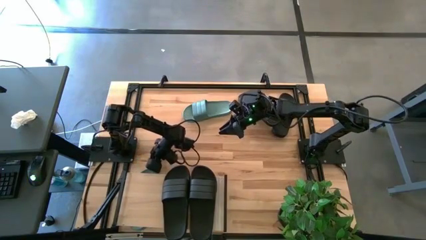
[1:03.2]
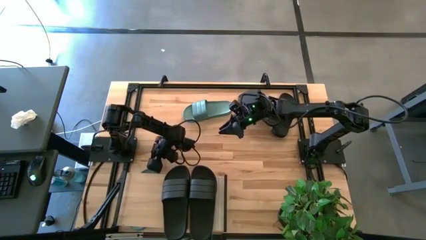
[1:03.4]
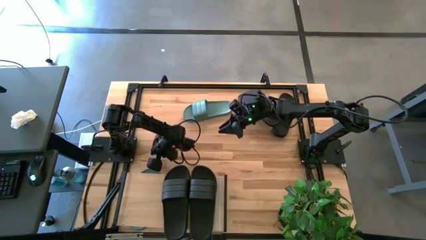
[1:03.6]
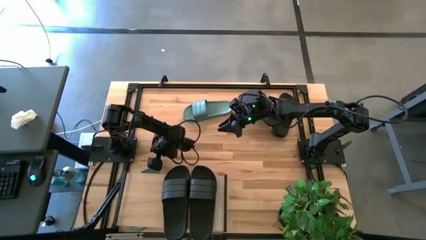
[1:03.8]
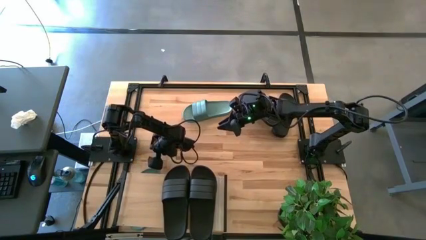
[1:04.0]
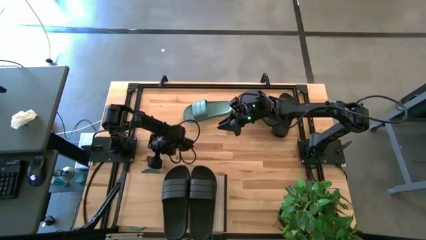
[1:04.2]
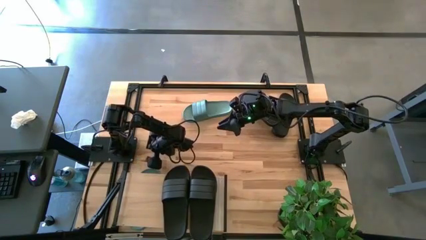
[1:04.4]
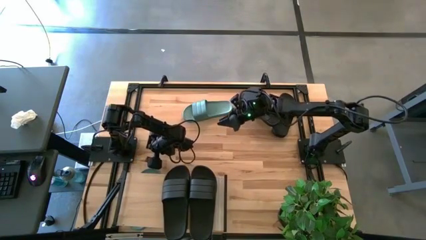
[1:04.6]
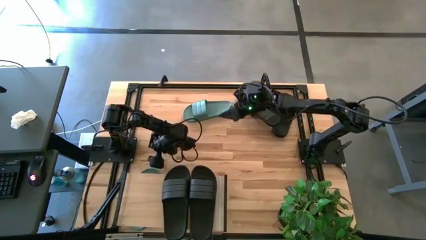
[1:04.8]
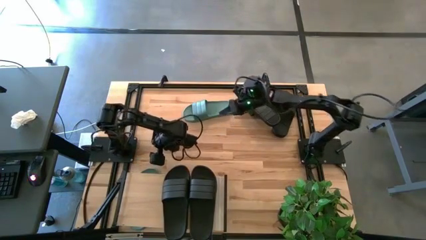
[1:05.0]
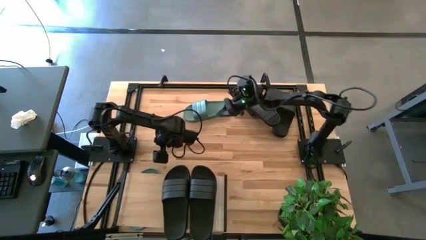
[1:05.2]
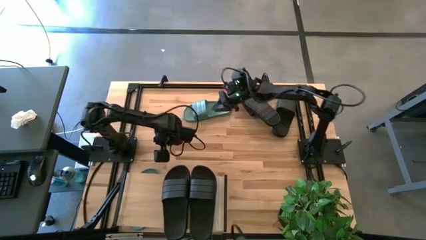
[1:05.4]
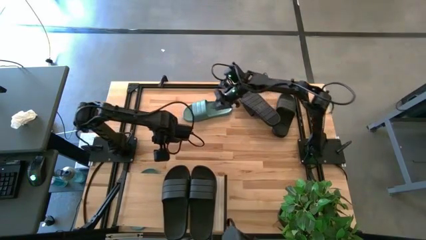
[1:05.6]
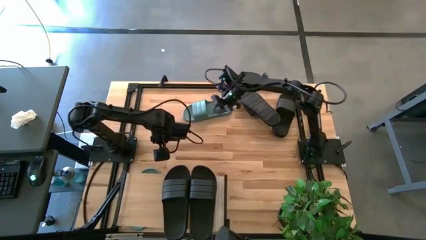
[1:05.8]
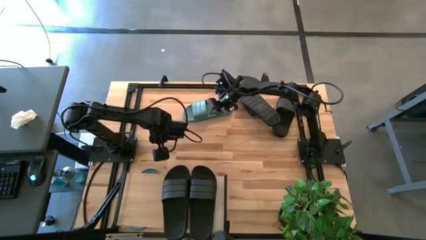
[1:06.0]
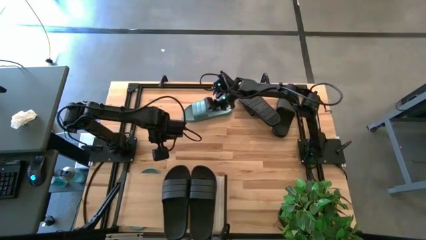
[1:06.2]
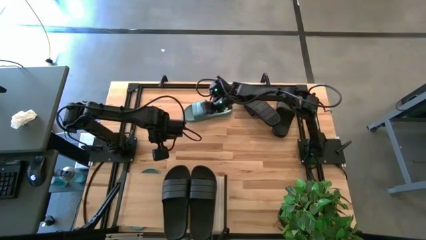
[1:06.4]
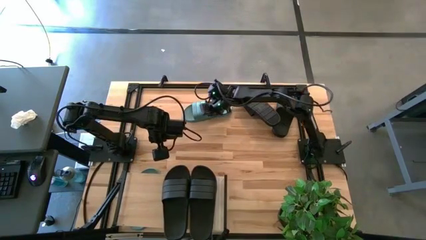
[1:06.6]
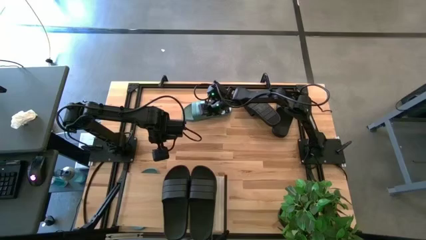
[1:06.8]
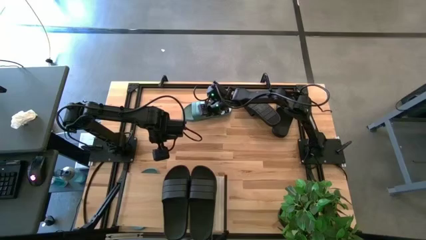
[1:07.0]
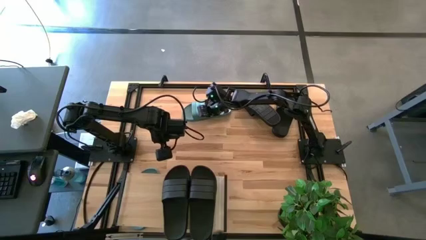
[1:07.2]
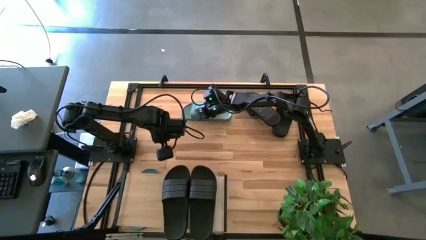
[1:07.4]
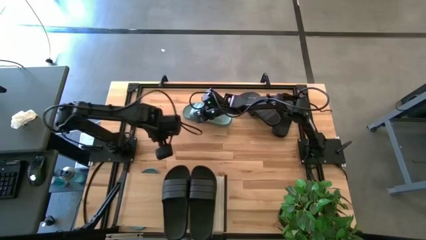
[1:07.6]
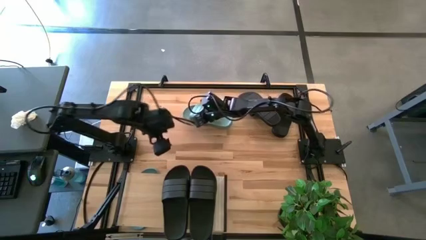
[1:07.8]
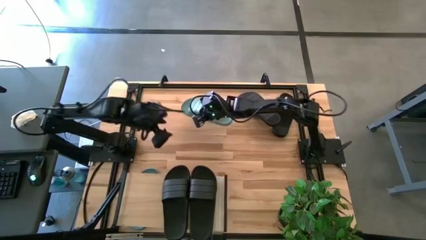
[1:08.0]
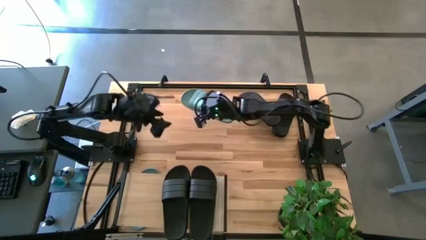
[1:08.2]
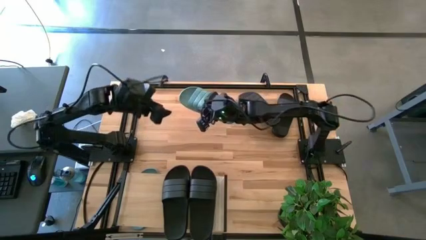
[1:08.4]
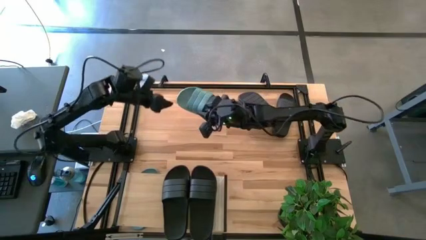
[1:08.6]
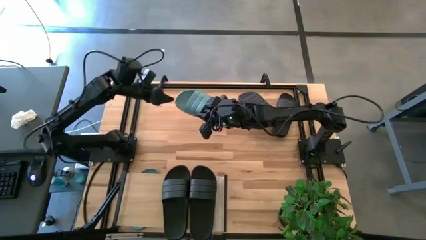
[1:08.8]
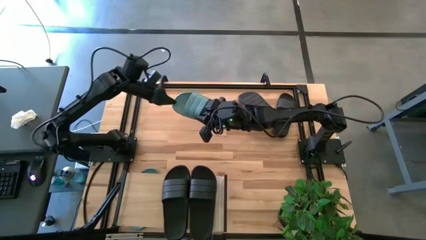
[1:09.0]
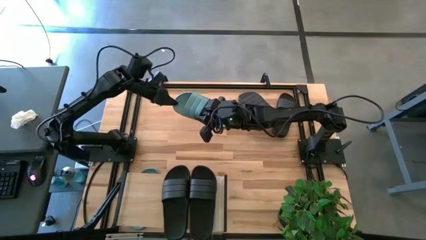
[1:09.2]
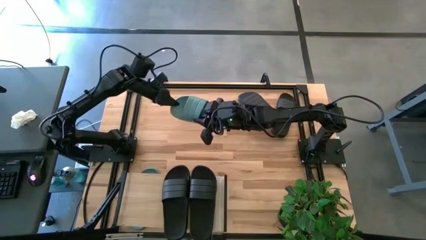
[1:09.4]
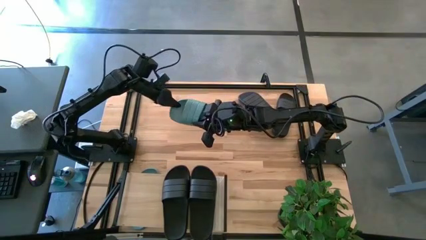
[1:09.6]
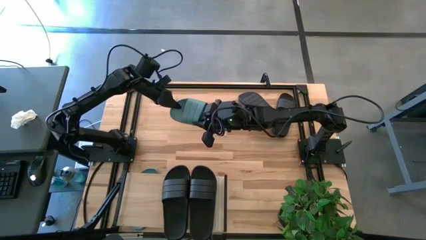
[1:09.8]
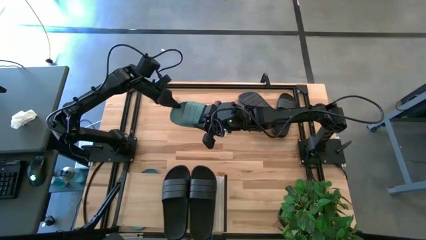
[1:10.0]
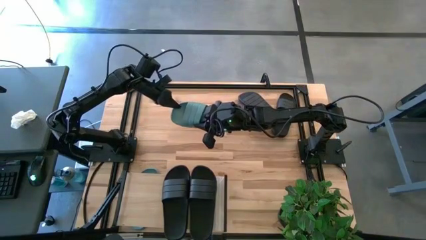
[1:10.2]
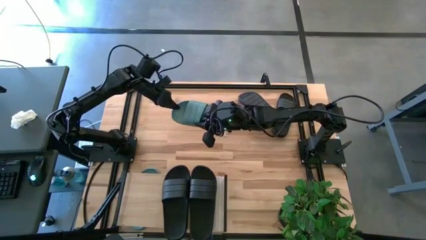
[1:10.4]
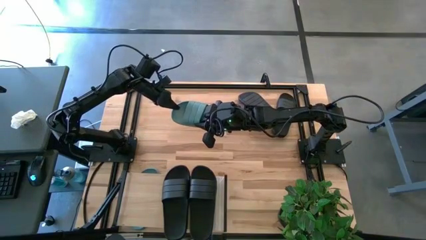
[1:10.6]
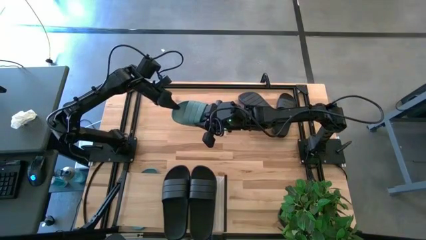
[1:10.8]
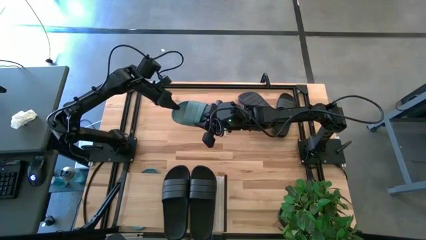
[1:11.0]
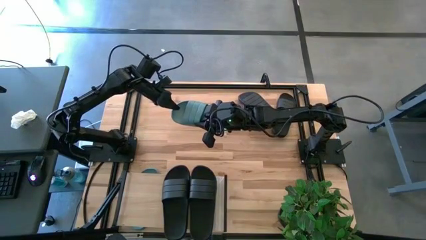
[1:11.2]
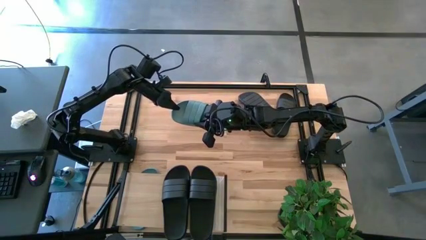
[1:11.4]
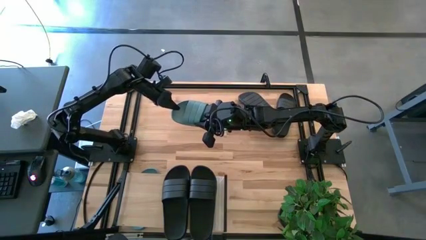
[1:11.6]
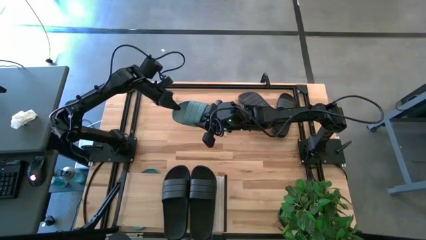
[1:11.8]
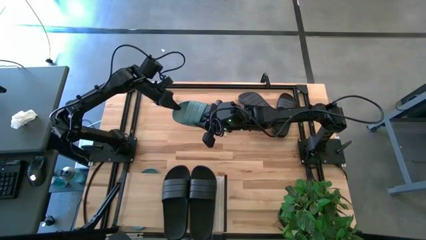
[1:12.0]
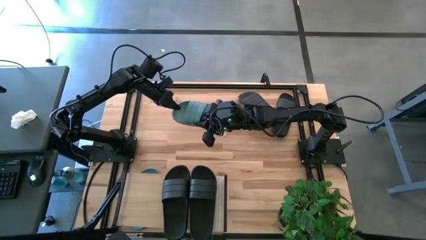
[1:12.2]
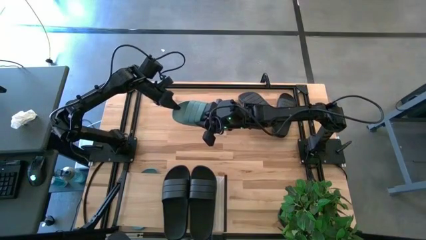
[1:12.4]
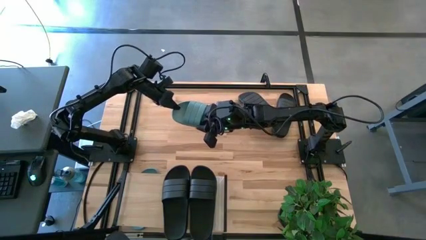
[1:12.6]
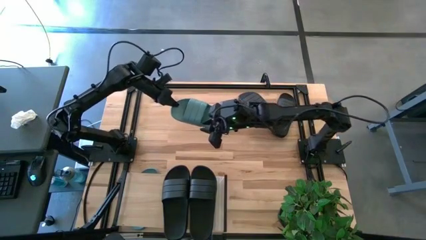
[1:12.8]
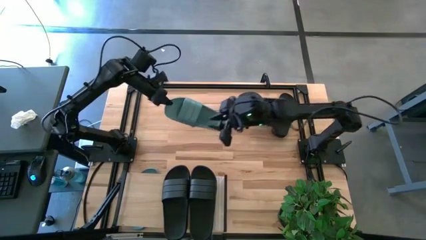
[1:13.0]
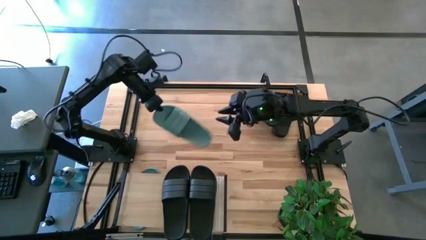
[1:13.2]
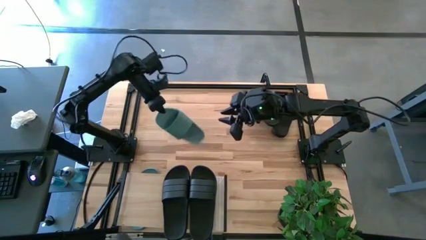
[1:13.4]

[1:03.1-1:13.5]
Task: Pick and place slides into the shelf
Put the green slipper under the shelf

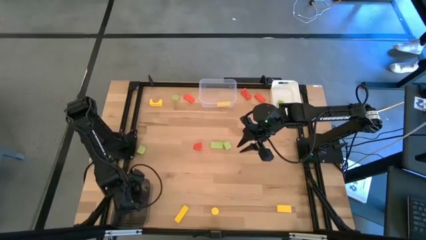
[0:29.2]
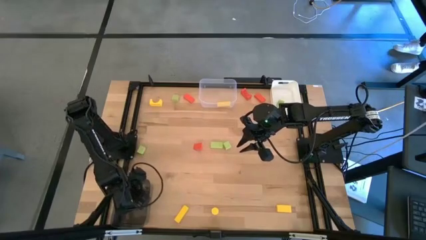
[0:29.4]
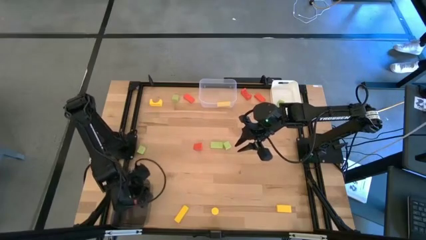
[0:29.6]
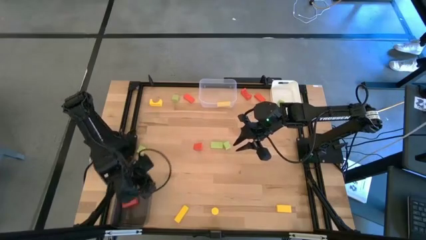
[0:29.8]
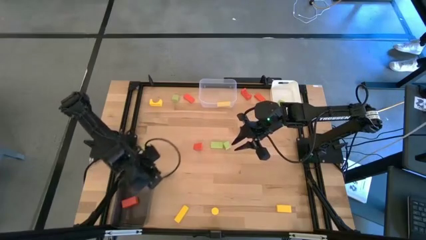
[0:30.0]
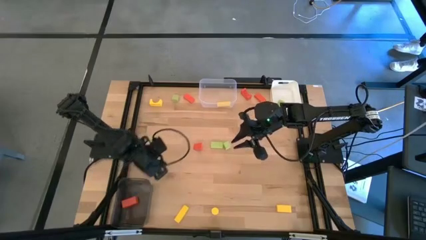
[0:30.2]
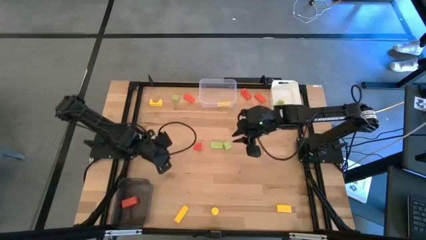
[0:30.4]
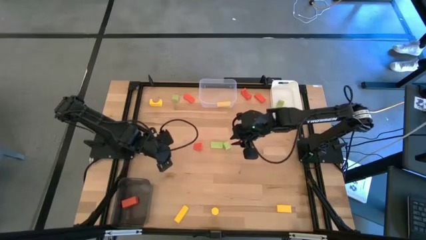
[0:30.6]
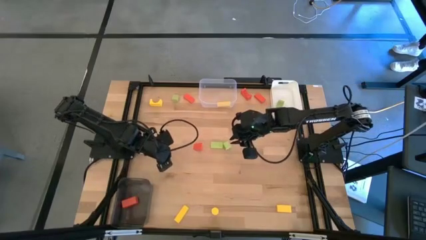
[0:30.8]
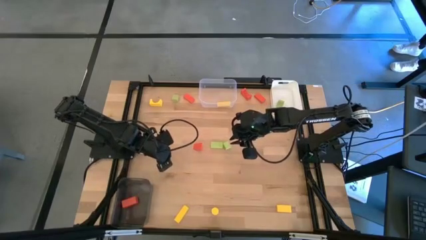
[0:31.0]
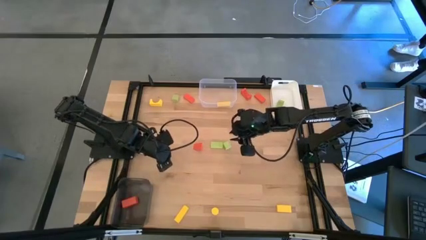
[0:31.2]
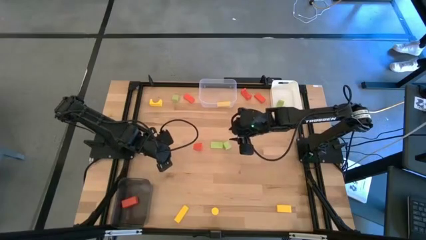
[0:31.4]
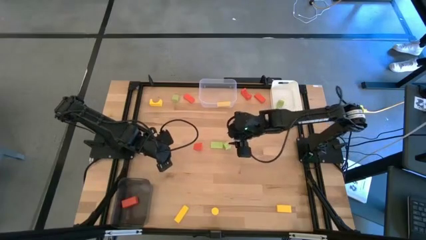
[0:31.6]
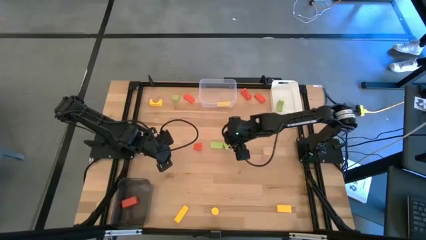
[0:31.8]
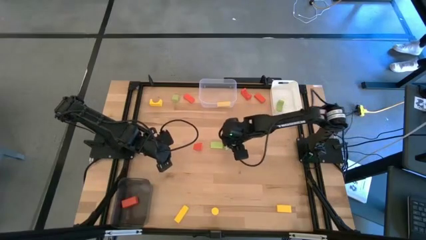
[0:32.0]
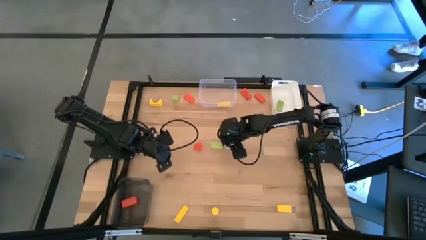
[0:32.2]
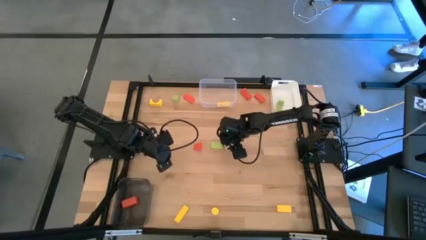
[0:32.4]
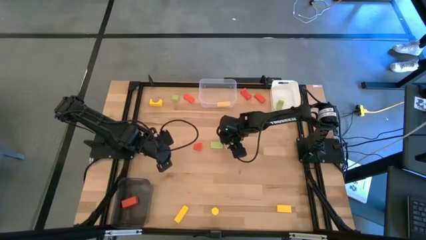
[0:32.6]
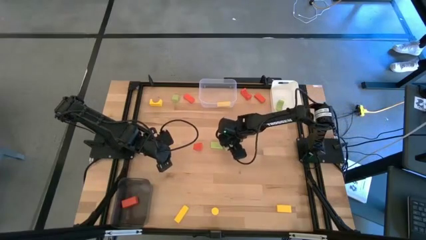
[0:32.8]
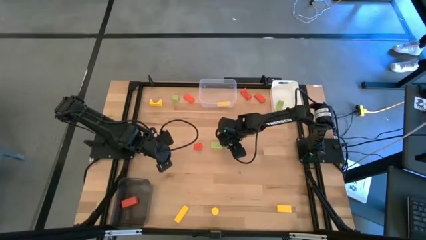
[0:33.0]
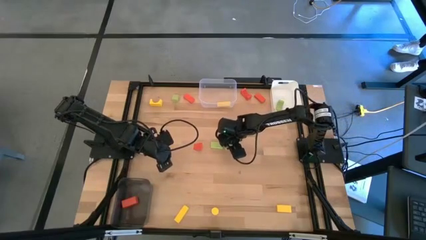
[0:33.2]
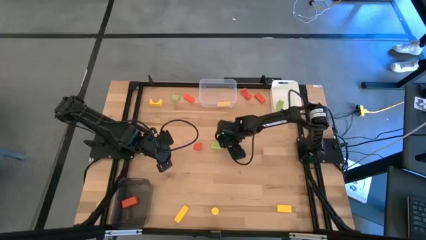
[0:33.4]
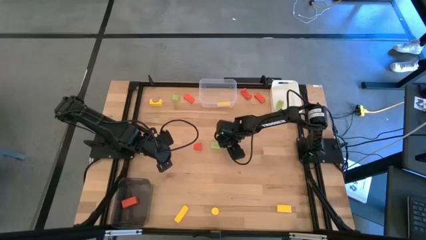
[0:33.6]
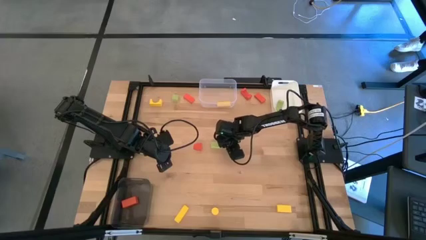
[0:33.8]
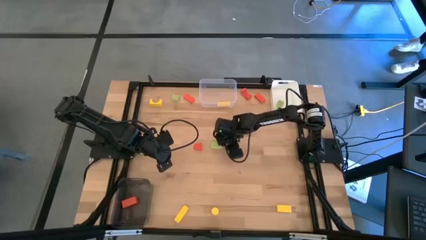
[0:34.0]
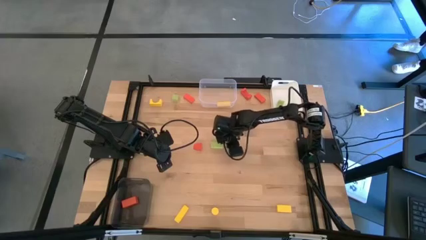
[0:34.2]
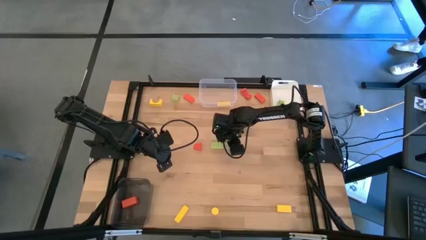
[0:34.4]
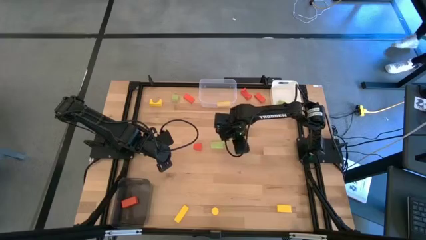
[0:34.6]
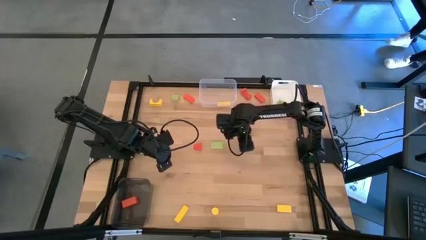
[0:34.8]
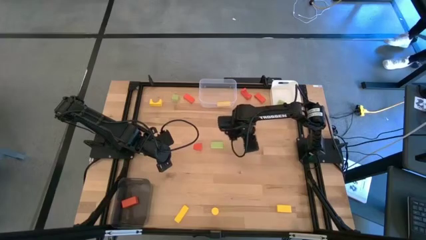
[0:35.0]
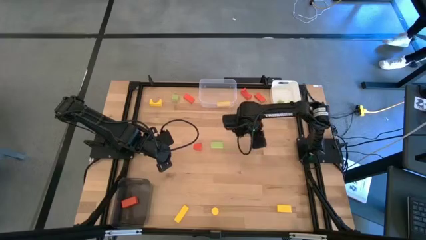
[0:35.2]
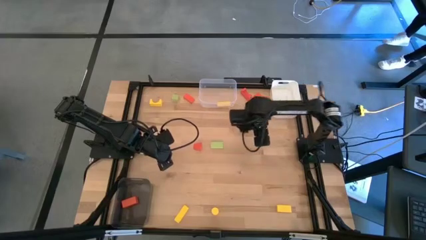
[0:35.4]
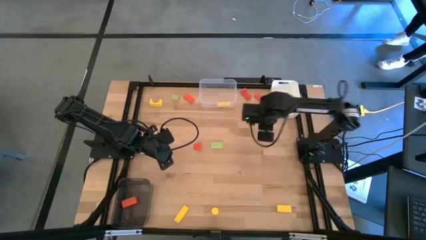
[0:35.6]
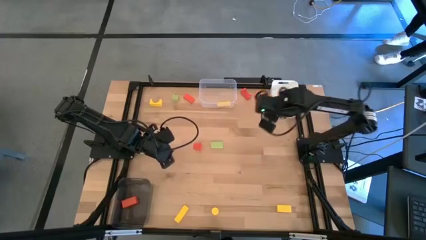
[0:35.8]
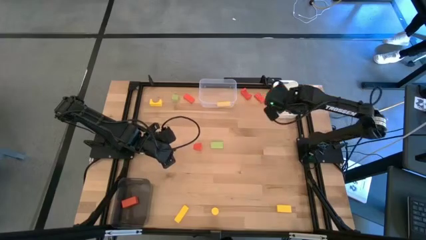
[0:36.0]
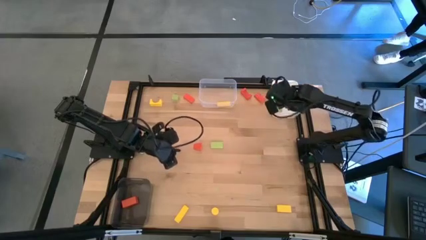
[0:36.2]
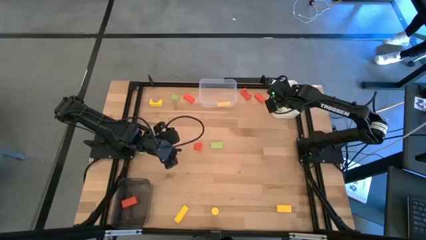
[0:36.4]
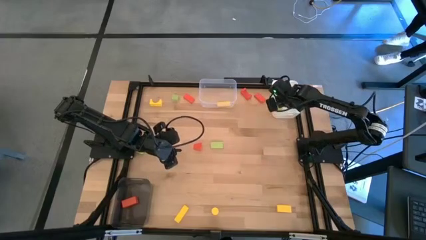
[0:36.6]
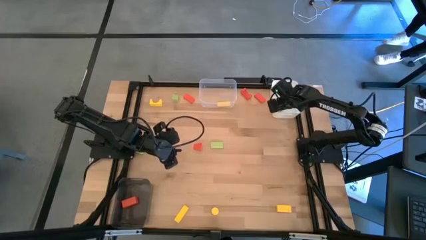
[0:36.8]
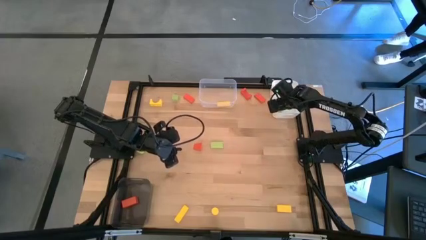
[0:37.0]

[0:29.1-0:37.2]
Task: Sort & place blocks by color
Put the green squared block into the white bin
